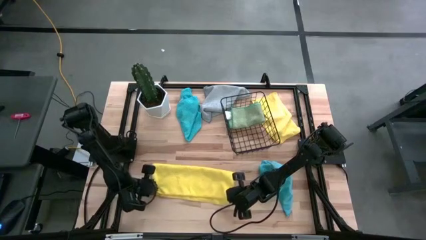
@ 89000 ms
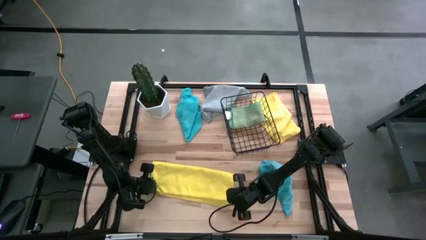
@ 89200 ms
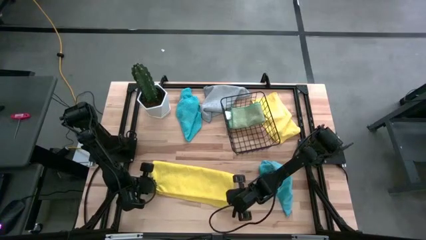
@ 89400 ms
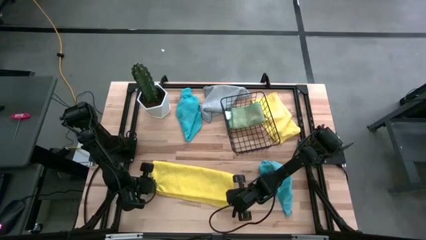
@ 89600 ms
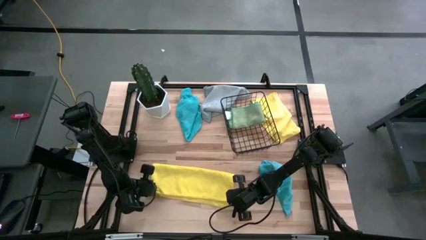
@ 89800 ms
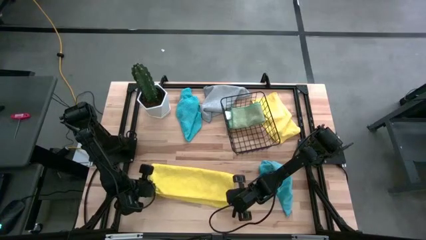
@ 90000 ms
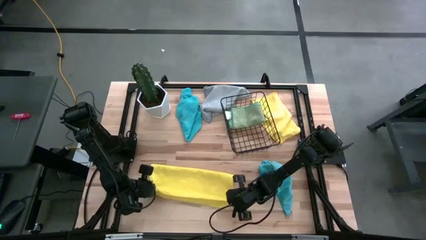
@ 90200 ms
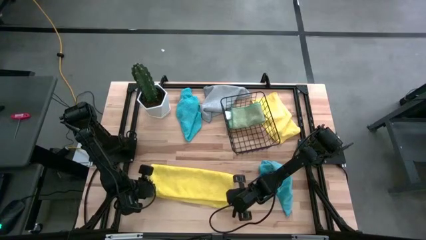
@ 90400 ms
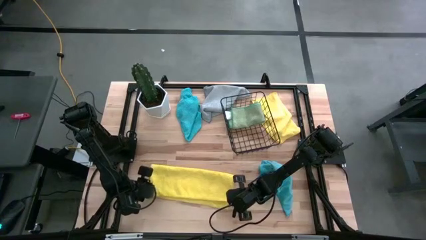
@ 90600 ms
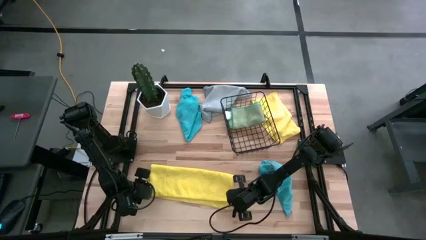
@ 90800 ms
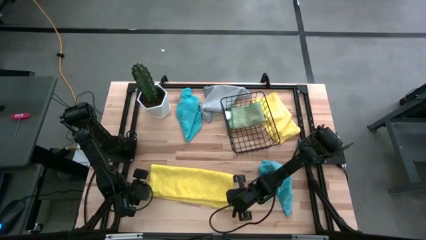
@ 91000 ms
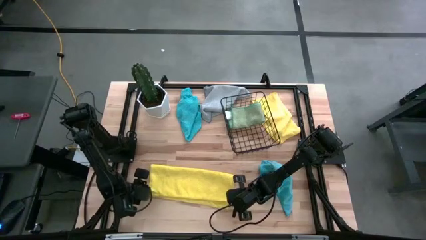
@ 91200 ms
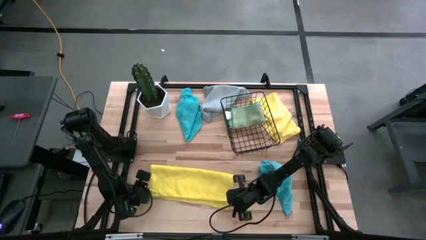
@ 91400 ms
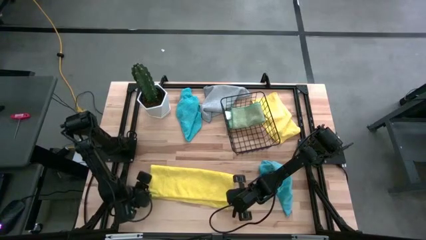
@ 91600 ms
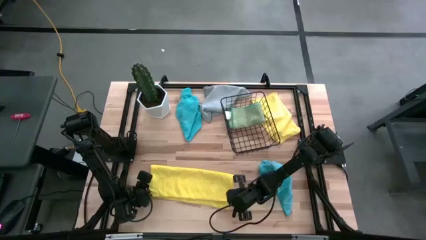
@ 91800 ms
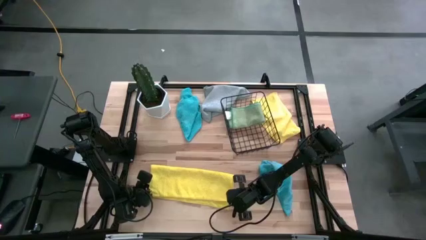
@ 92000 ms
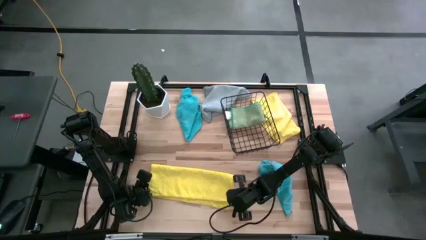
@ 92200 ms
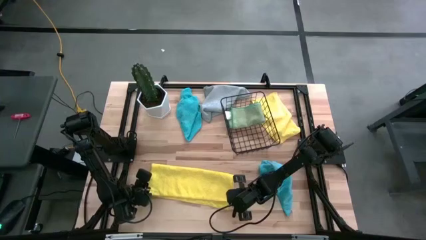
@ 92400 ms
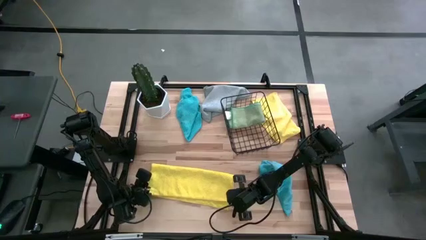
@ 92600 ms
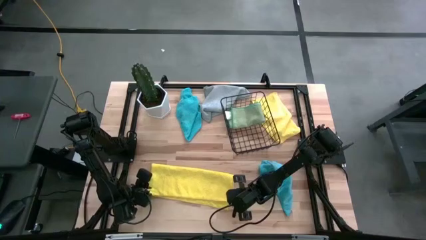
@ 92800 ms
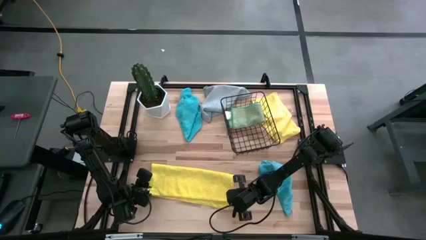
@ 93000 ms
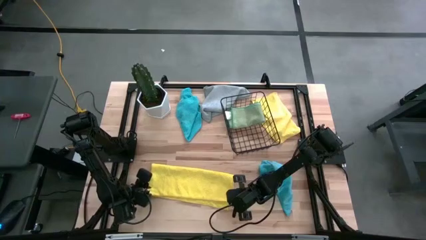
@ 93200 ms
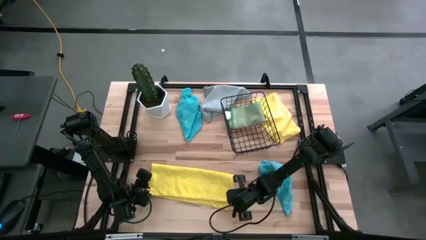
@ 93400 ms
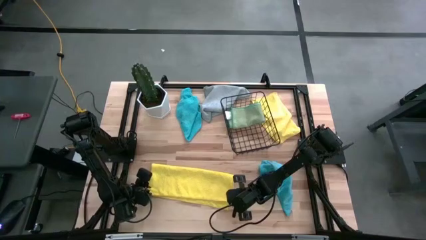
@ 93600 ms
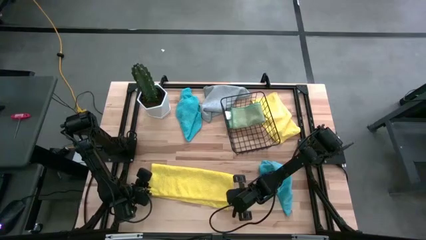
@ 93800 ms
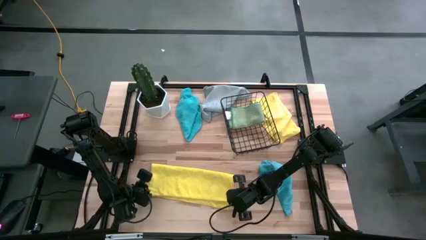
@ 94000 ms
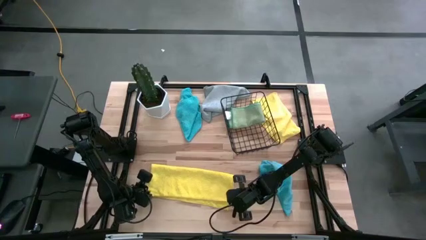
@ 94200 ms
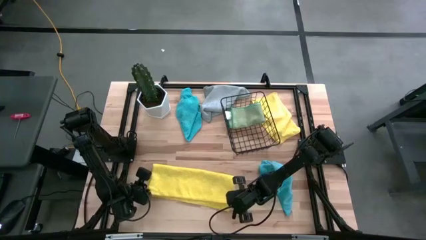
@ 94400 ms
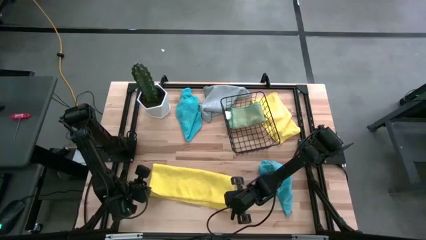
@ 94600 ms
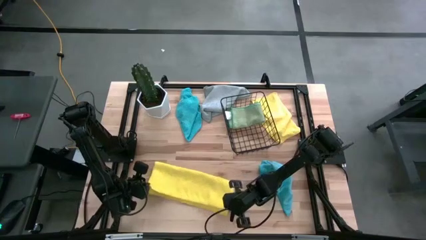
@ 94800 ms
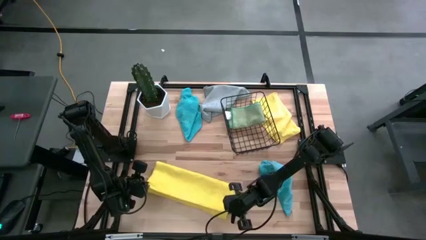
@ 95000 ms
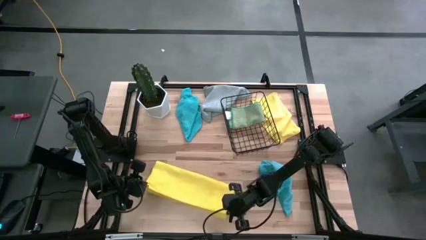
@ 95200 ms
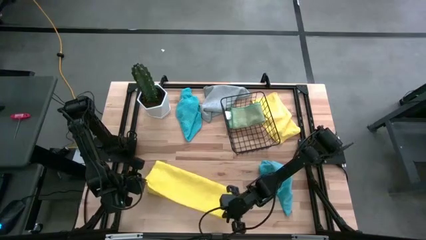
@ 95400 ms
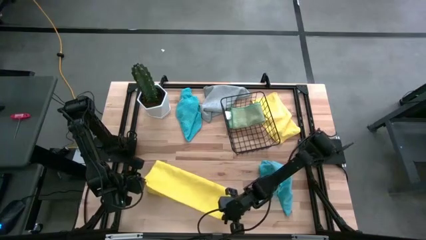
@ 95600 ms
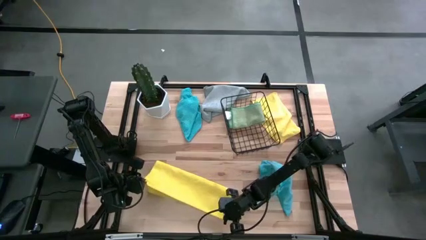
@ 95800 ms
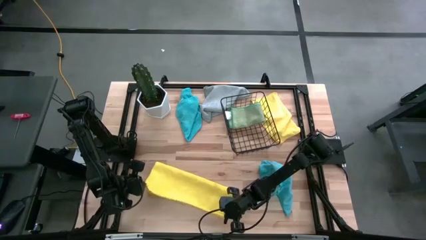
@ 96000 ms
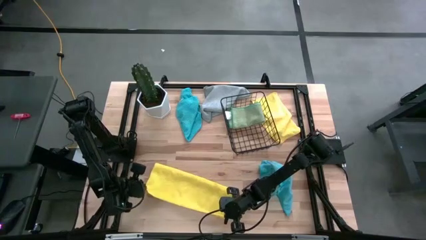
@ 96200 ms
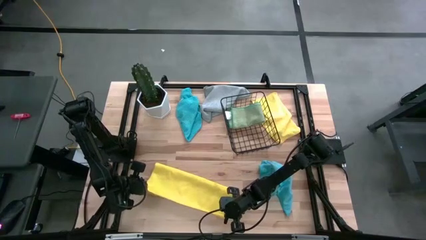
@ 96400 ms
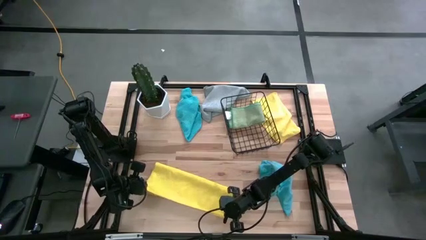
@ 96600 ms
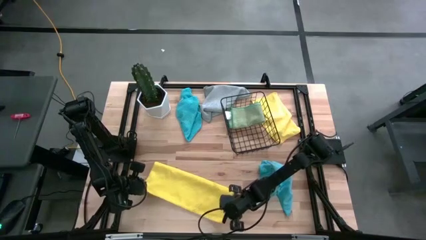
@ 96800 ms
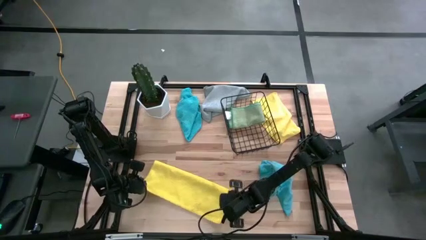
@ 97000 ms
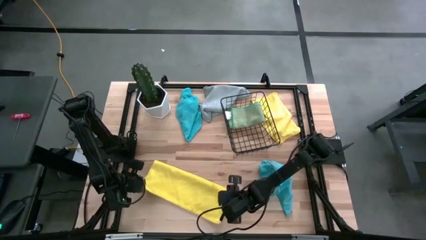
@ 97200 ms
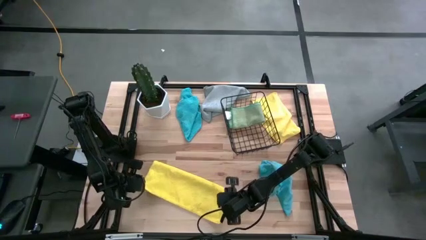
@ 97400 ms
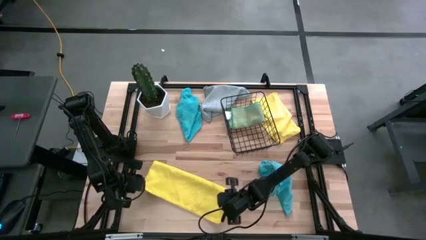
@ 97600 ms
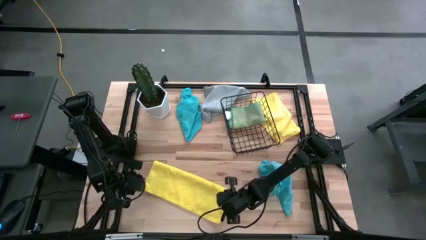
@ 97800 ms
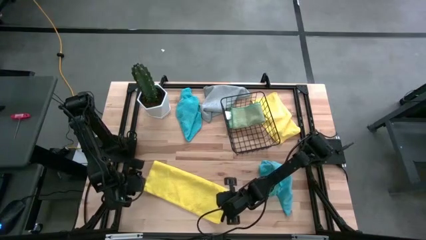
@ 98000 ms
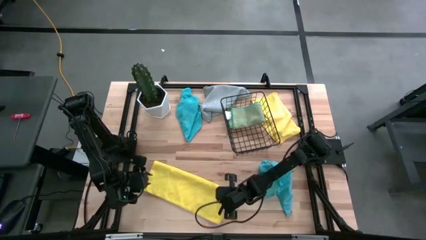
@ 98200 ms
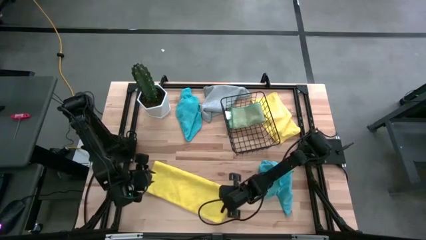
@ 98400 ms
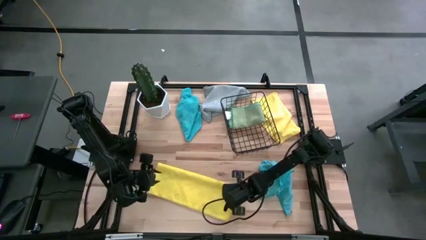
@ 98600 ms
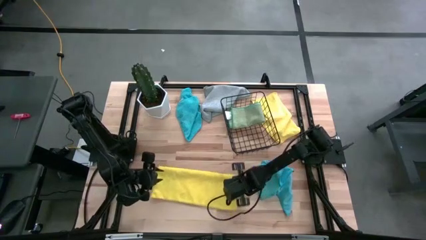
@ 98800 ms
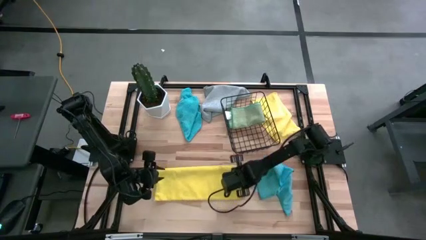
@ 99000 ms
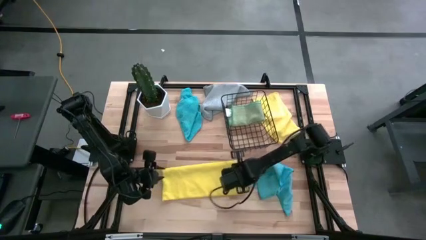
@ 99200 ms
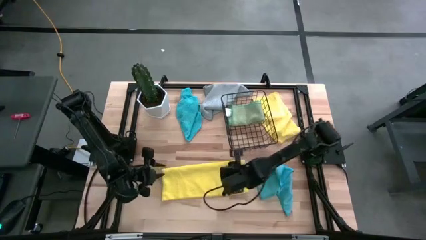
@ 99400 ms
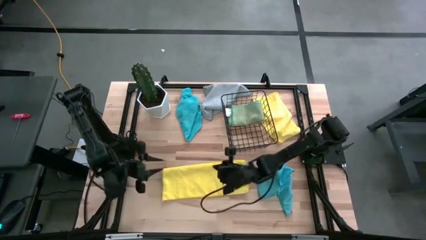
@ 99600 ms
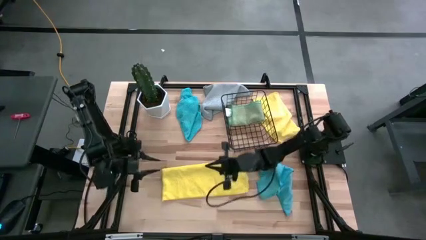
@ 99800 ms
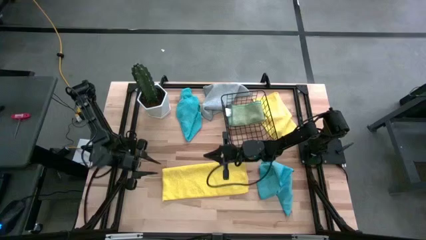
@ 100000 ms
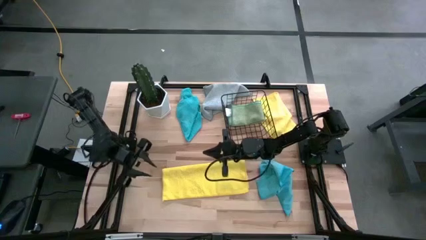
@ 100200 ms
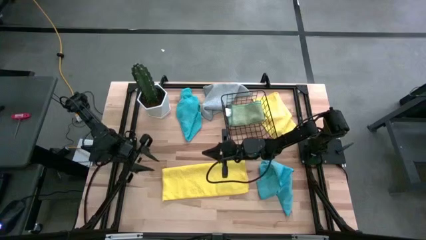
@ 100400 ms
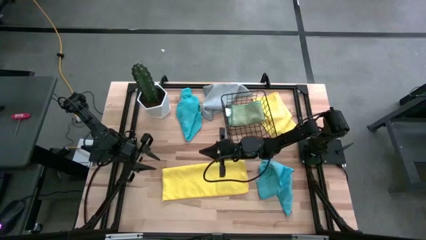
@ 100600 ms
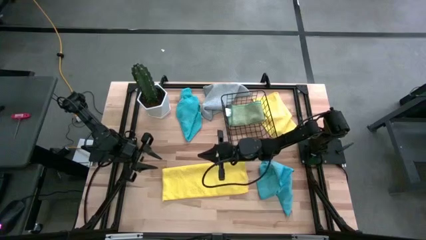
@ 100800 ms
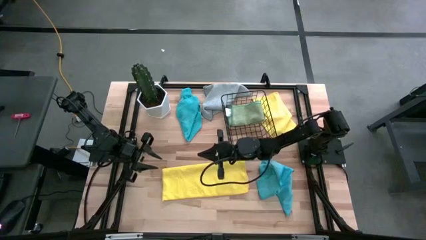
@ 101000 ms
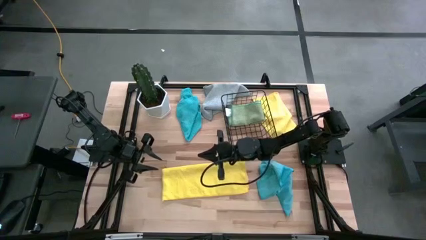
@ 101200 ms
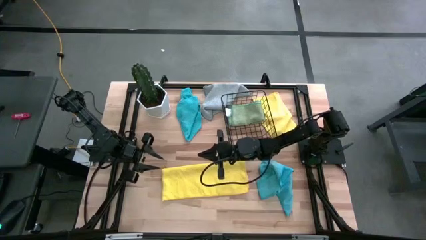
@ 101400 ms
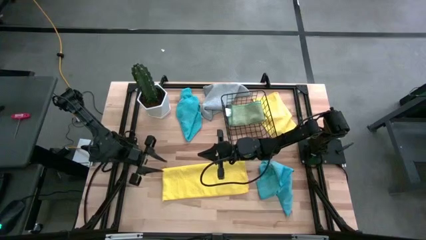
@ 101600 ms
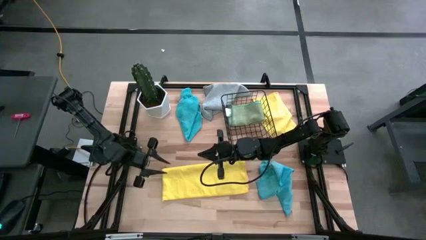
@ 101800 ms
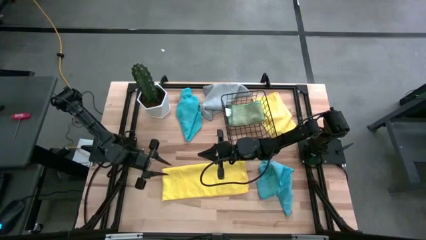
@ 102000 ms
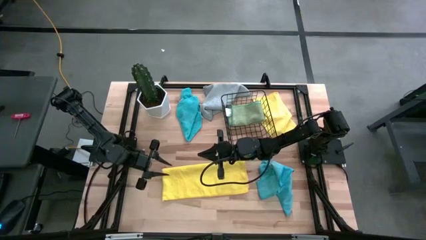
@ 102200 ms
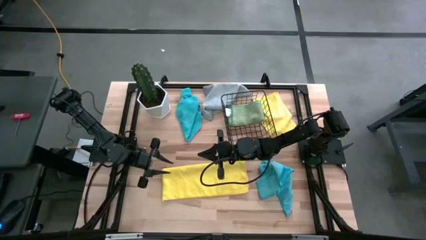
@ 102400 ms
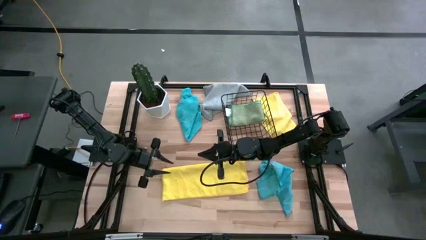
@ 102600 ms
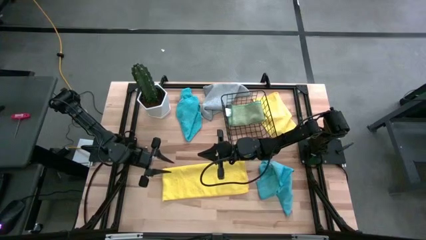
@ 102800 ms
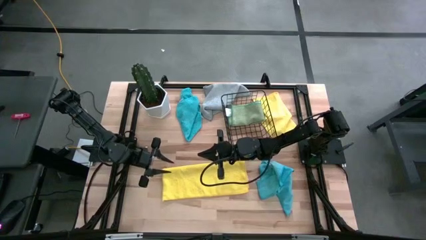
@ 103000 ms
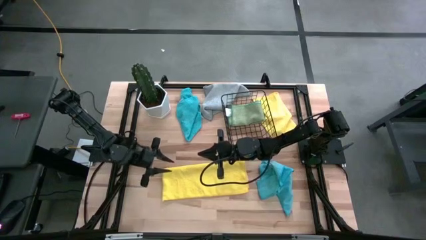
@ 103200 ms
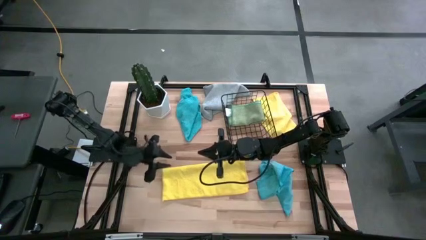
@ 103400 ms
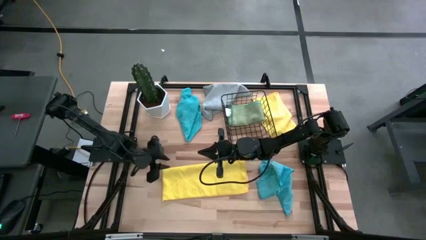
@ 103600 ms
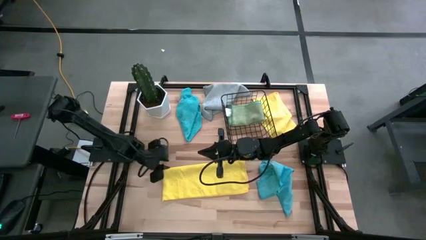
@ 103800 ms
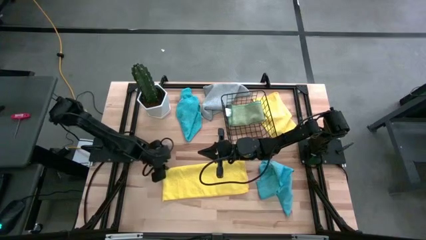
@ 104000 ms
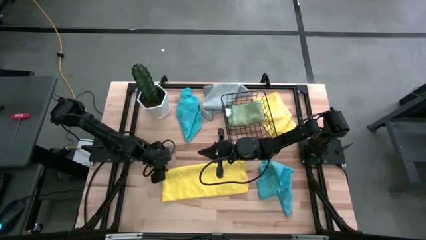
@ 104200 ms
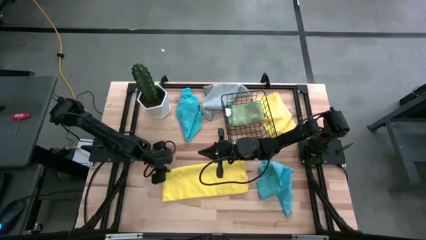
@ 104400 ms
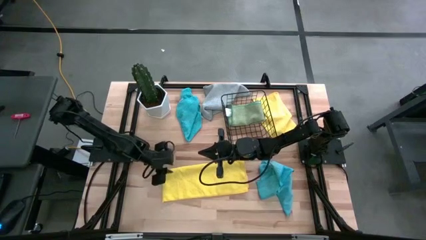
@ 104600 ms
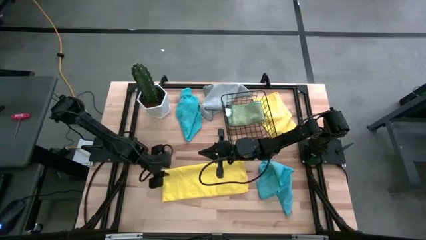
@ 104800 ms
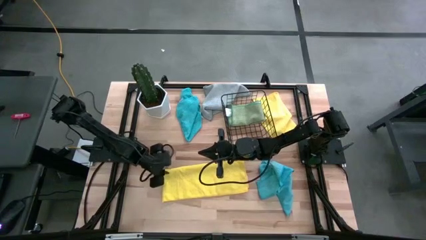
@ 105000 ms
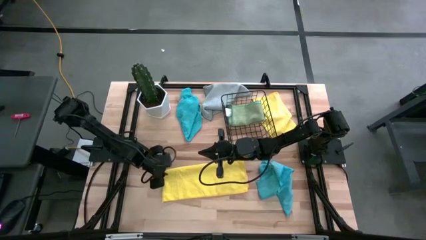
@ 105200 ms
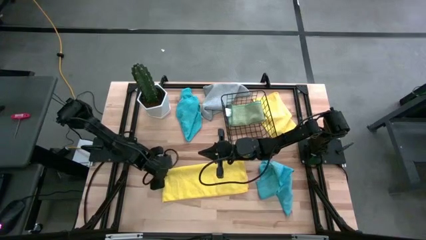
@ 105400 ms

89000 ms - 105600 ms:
Task: Fold microfiber towels
Fold the bottom yellow microfiber towel
